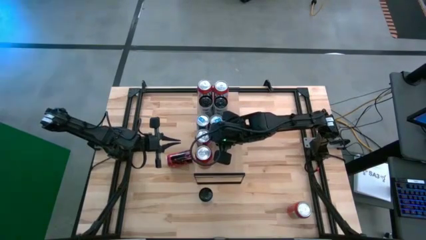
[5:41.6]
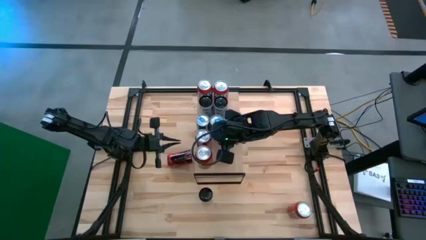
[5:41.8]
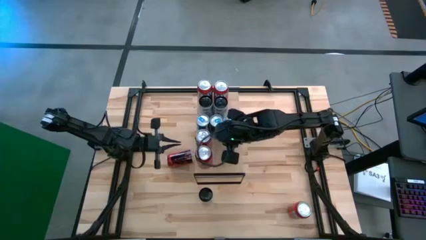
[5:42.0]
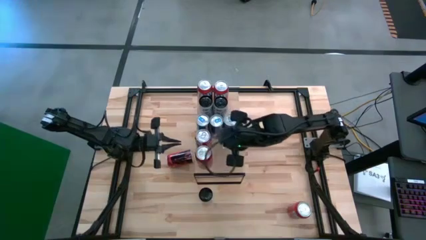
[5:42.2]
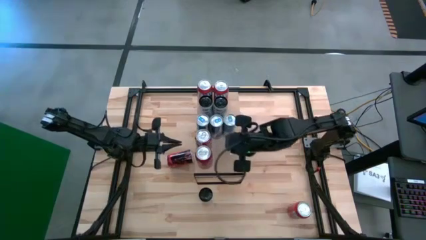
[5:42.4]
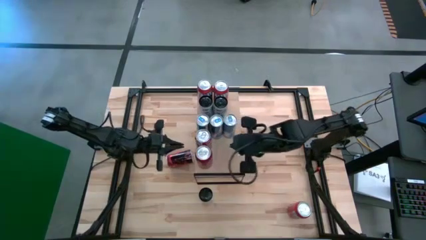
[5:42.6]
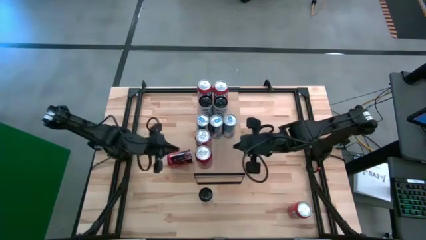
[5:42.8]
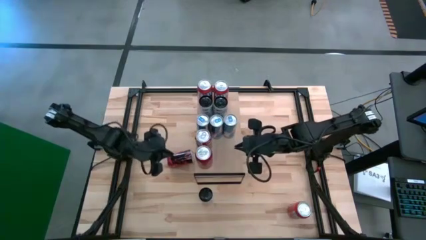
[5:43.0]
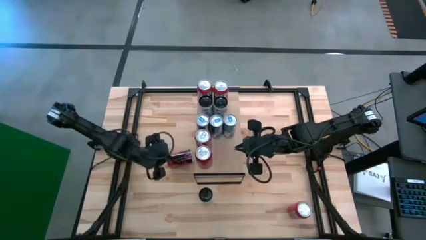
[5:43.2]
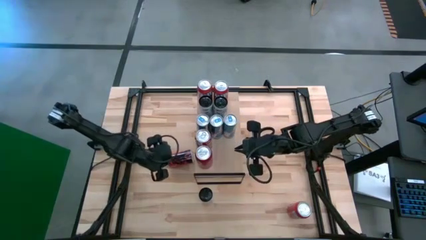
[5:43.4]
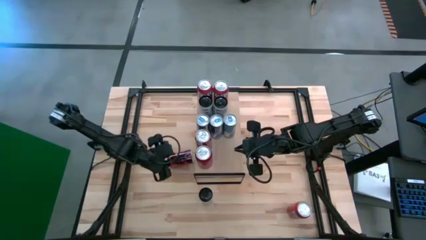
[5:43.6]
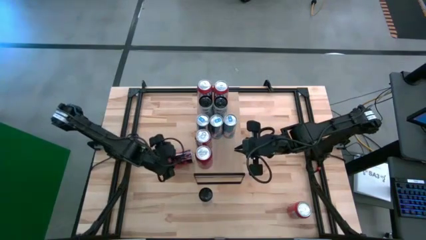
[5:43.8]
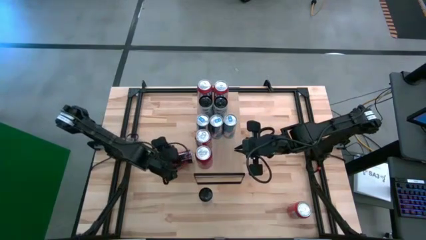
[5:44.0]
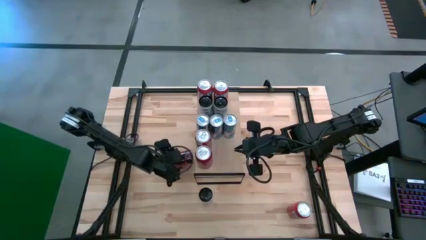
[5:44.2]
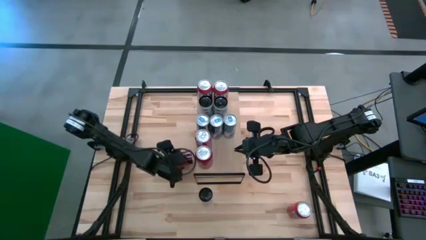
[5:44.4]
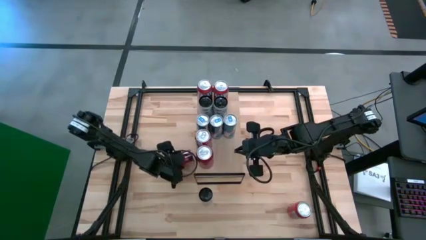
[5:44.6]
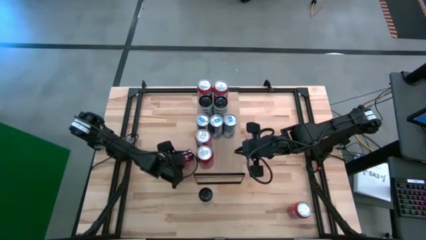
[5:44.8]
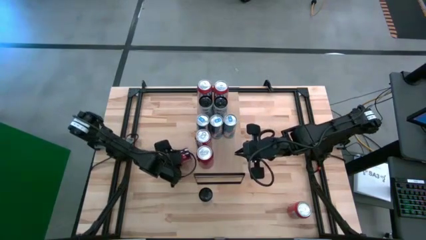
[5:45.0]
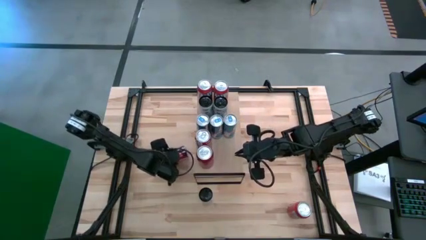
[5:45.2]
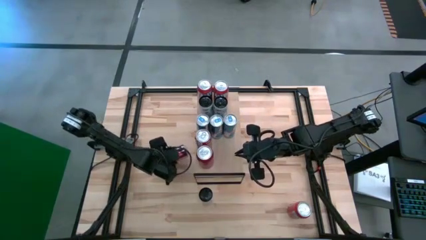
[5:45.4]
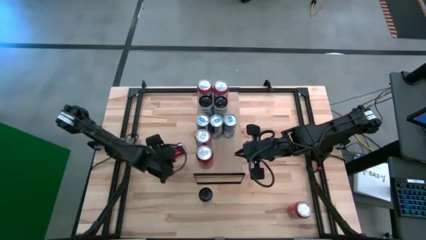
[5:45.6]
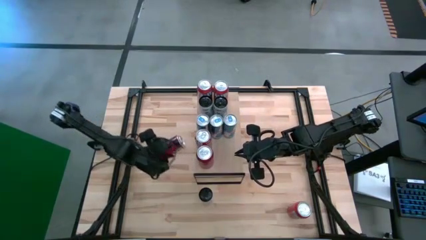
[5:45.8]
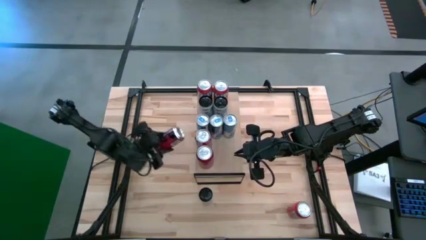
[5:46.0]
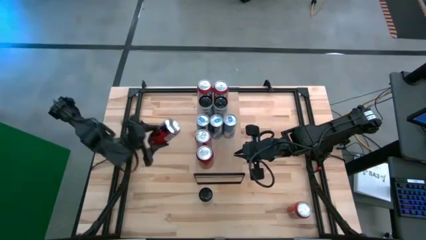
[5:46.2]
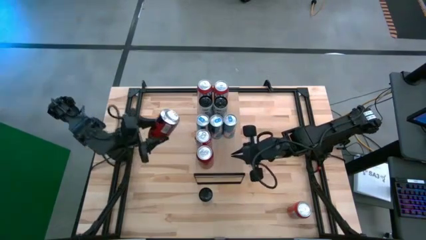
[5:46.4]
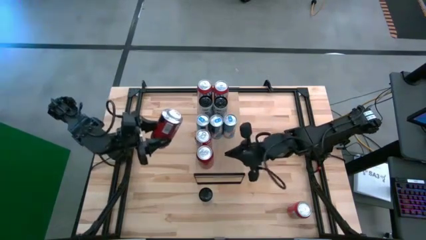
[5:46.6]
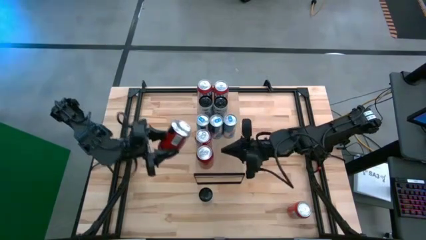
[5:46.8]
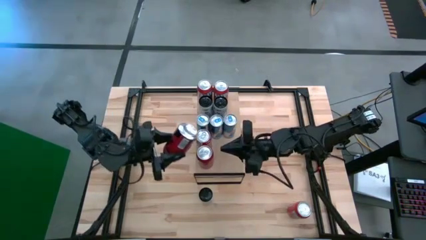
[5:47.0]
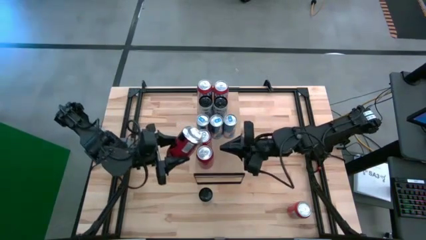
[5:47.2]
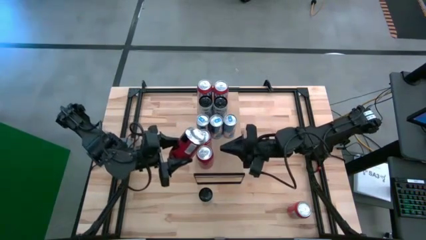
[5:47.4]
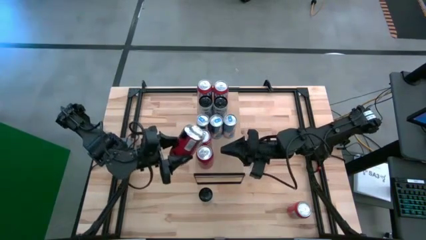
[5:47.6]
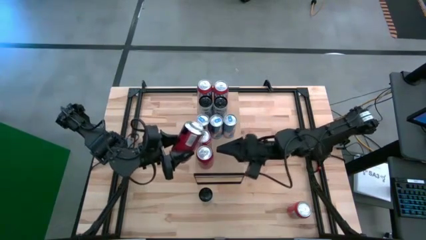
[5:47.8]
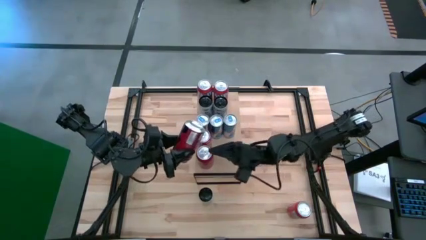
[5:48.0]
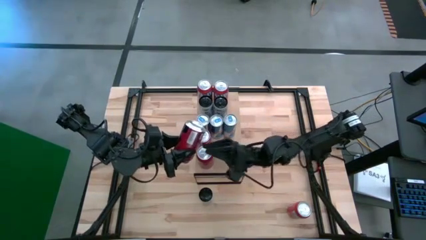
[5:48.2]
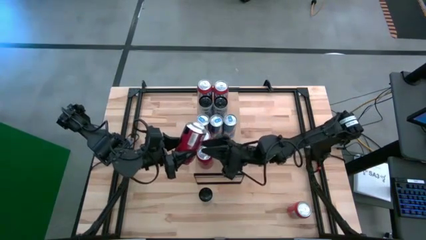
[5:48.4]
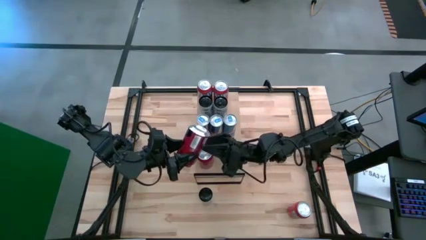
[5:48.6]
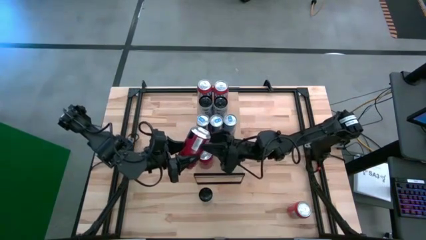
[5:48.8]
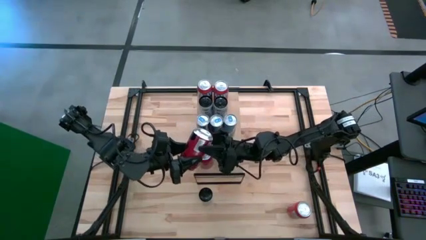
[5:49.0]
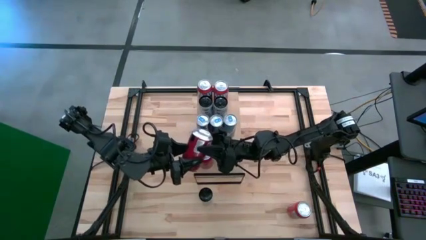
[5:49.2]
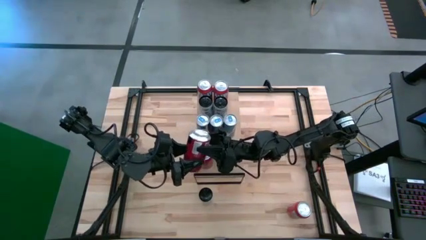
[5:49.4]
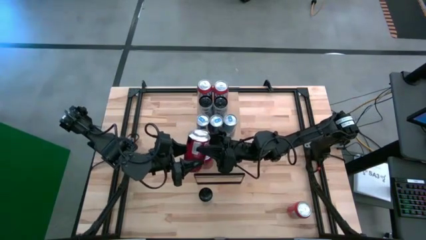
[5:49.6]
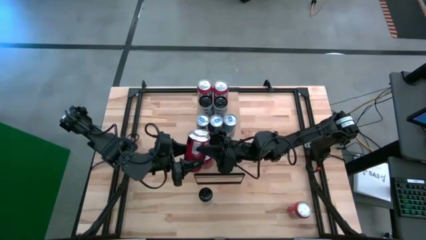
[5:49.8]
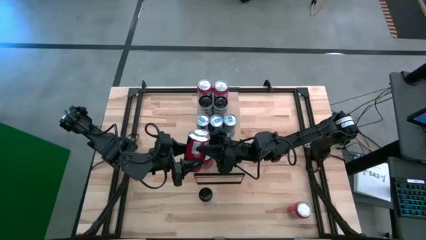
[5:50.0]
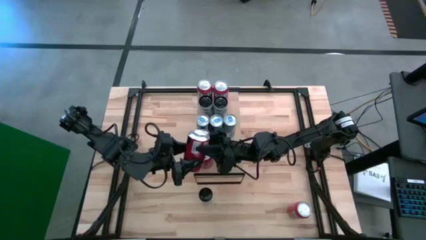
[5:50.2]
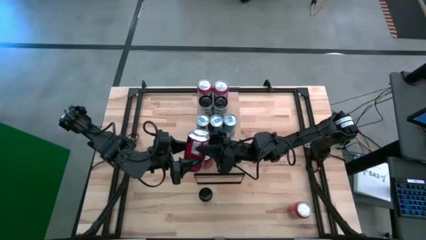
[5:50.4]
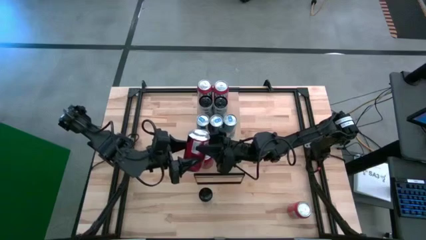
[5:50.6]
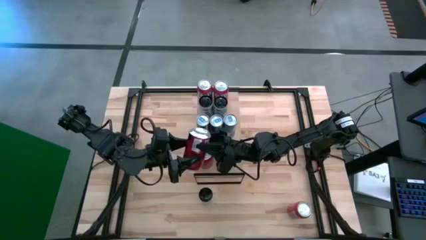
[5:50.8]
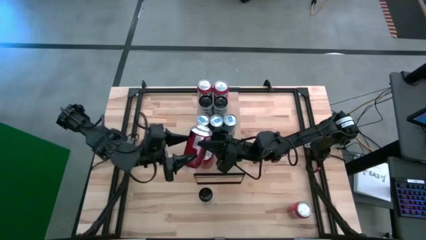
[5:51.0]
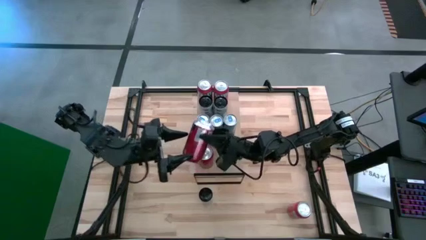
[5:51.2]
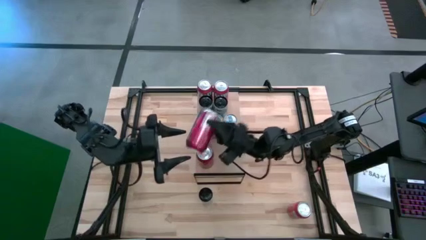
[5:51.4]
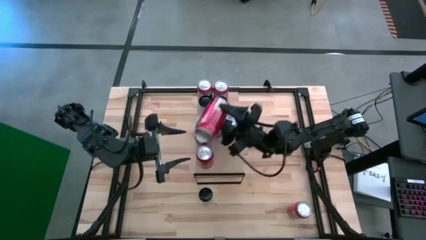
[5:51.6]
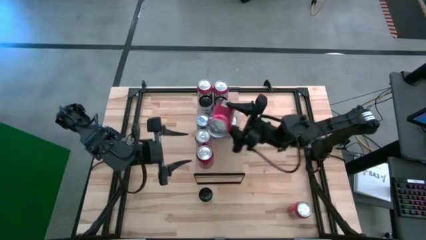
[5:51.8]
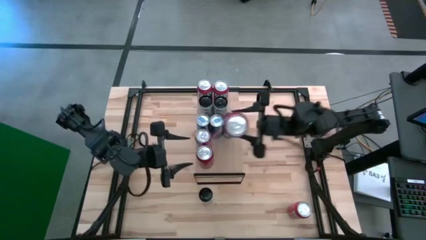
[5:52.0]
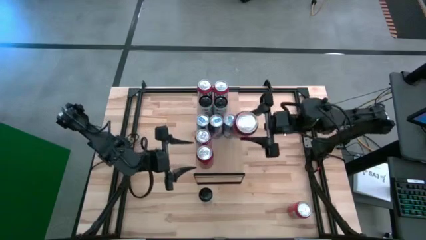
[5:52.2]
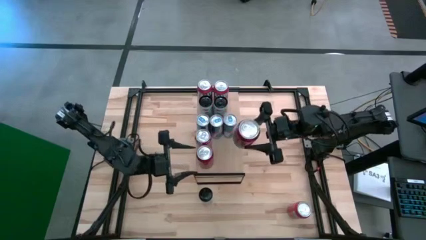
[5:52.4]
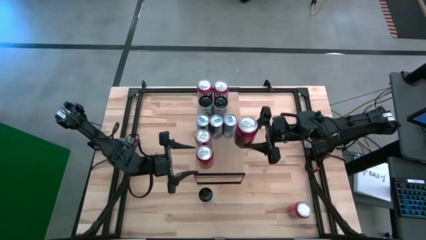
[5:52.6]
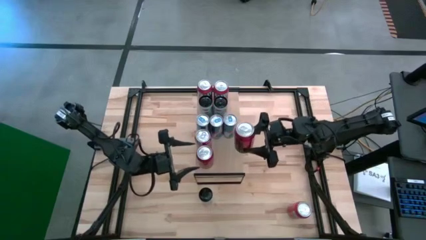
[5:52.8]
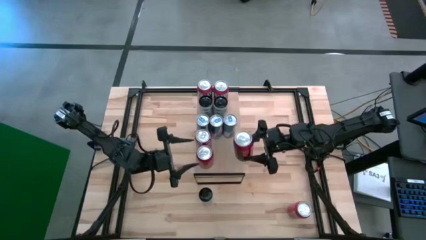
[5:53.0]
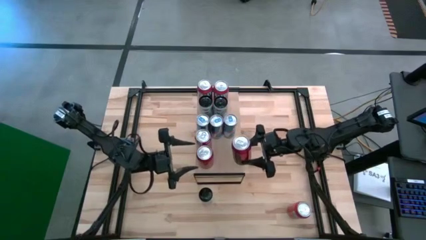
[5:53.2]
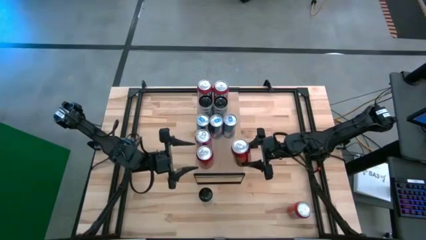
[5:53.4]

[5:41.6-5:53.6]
Task: Place canned beverage on shelf
Put the red black soda can on the shelf aligned with the other red black soda can
